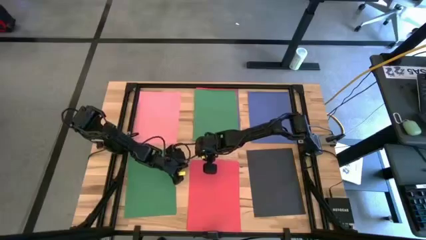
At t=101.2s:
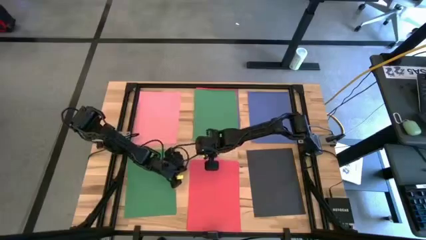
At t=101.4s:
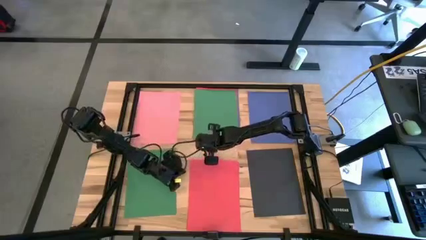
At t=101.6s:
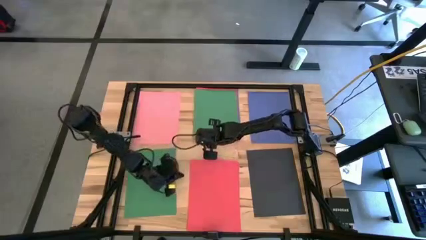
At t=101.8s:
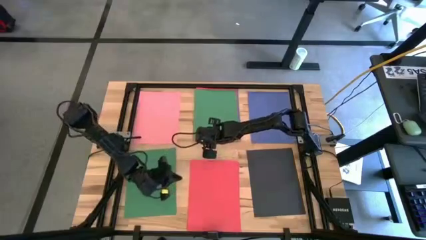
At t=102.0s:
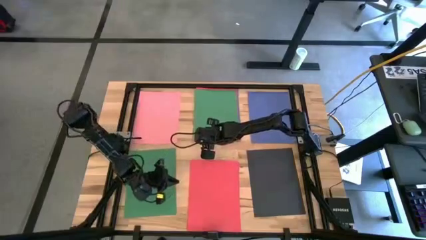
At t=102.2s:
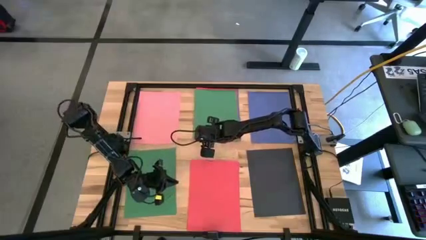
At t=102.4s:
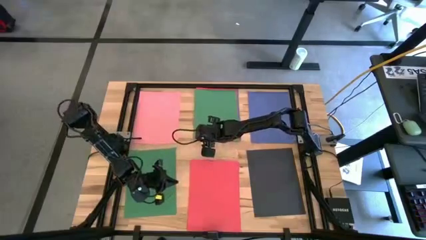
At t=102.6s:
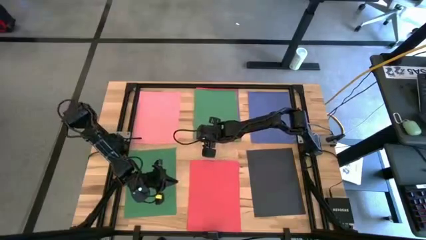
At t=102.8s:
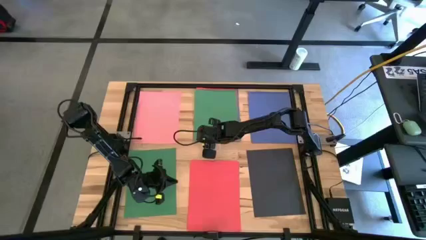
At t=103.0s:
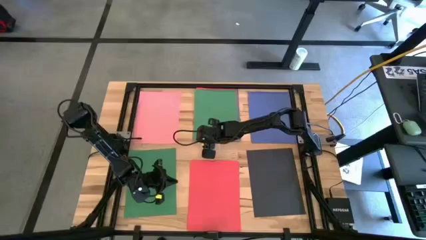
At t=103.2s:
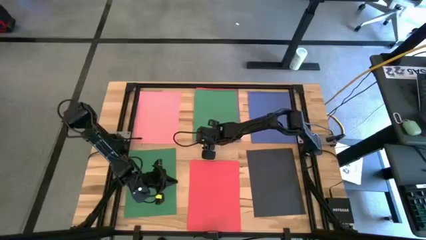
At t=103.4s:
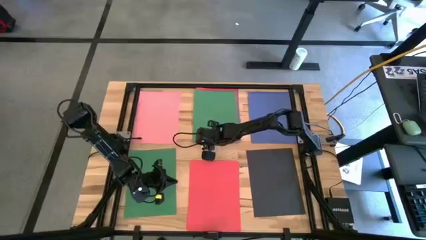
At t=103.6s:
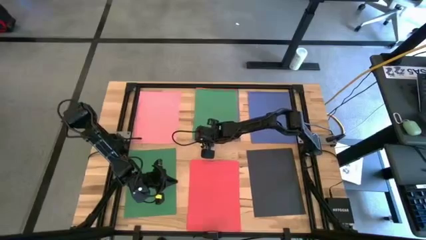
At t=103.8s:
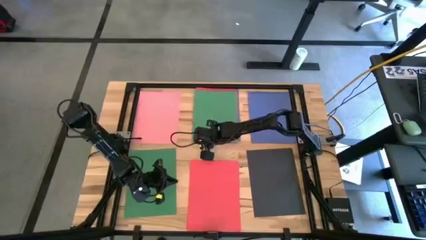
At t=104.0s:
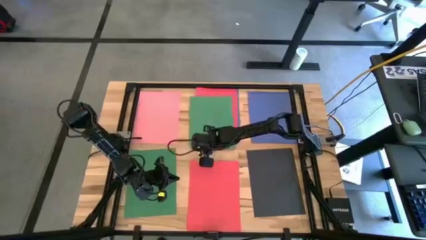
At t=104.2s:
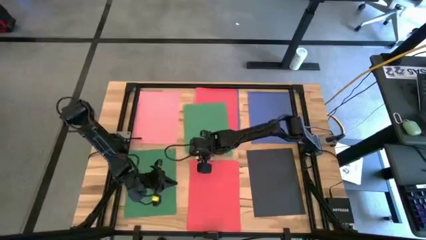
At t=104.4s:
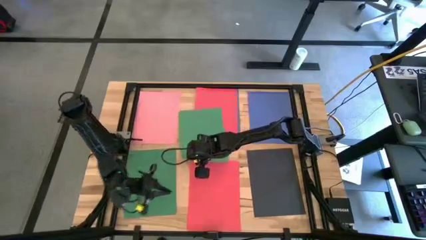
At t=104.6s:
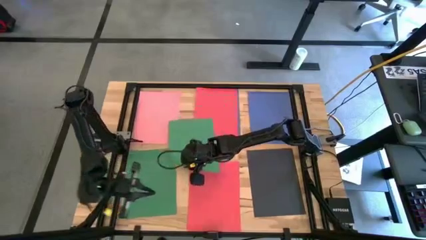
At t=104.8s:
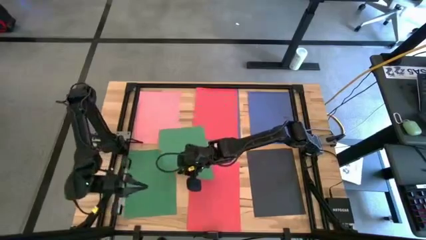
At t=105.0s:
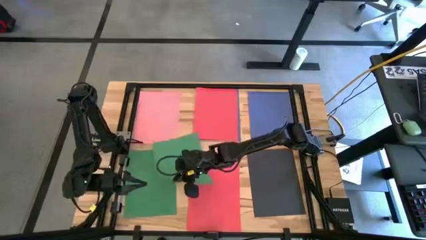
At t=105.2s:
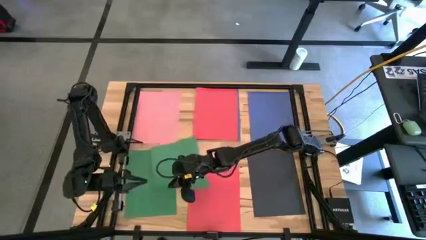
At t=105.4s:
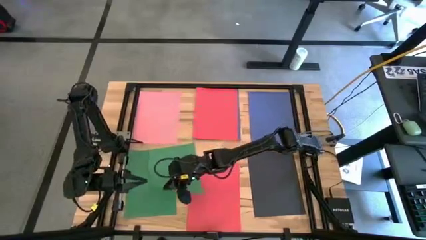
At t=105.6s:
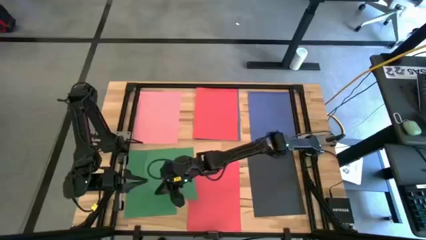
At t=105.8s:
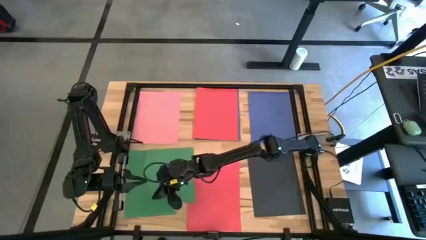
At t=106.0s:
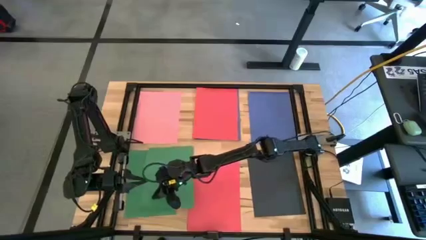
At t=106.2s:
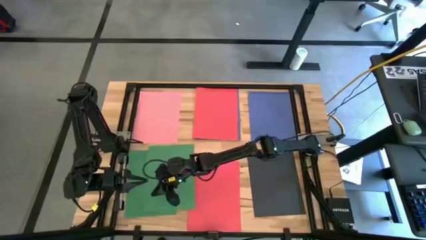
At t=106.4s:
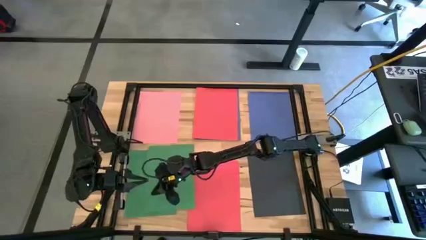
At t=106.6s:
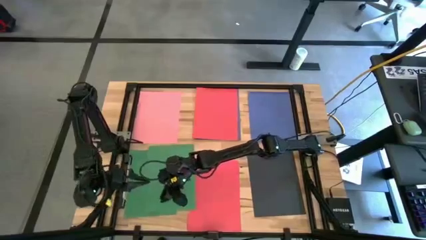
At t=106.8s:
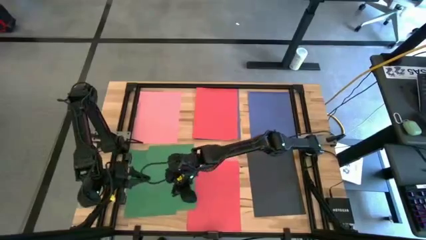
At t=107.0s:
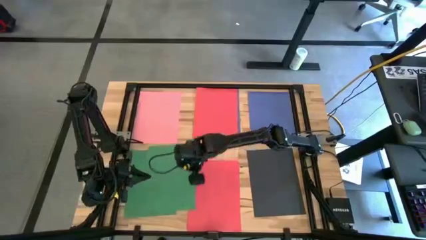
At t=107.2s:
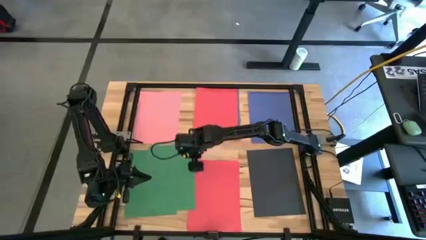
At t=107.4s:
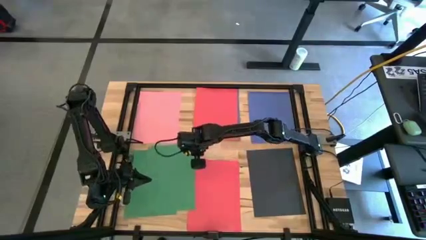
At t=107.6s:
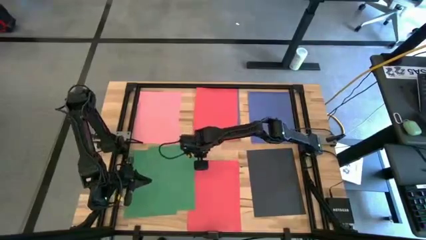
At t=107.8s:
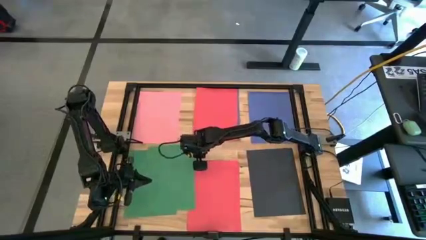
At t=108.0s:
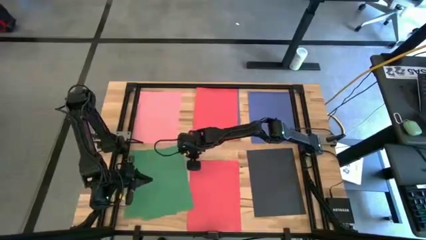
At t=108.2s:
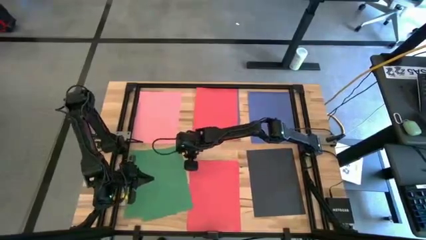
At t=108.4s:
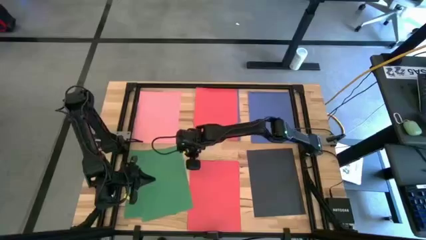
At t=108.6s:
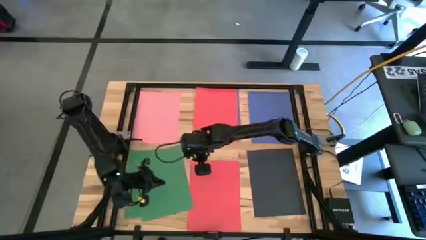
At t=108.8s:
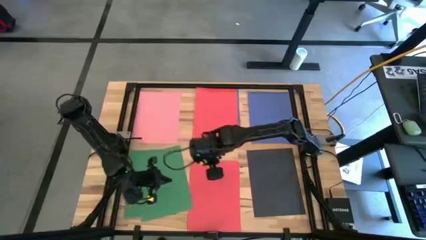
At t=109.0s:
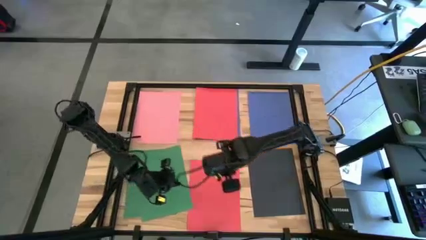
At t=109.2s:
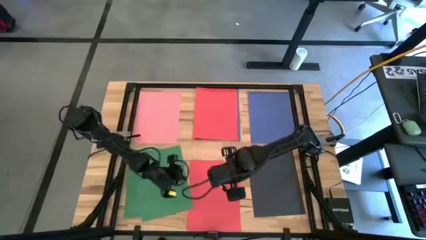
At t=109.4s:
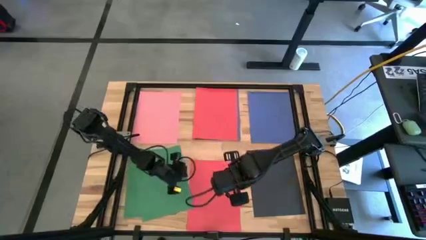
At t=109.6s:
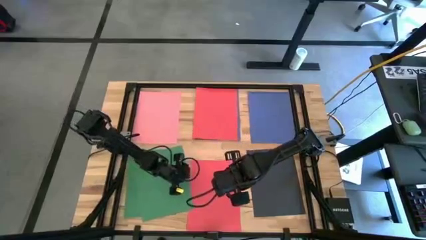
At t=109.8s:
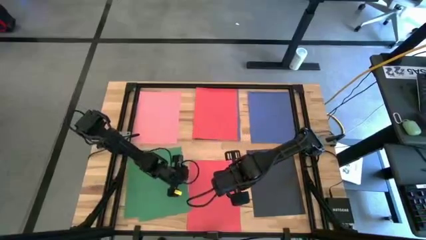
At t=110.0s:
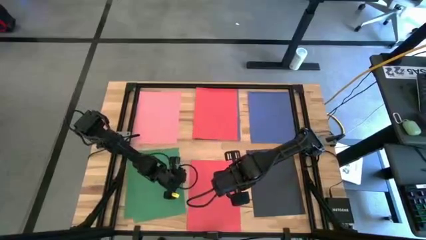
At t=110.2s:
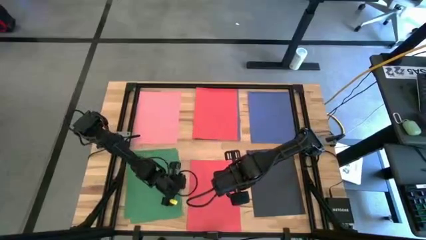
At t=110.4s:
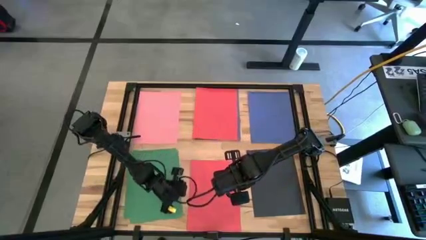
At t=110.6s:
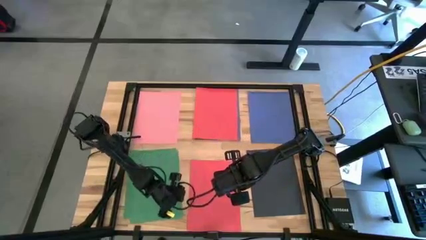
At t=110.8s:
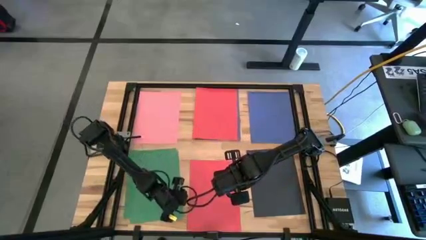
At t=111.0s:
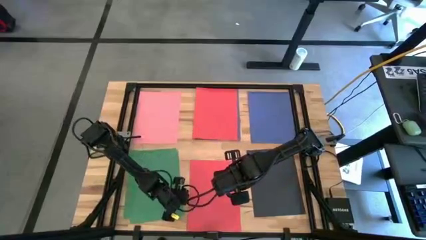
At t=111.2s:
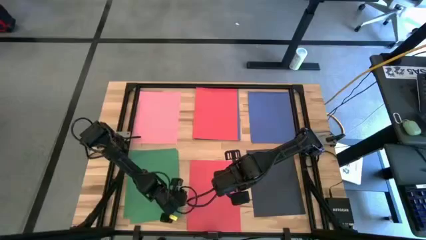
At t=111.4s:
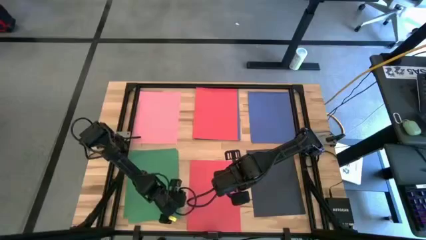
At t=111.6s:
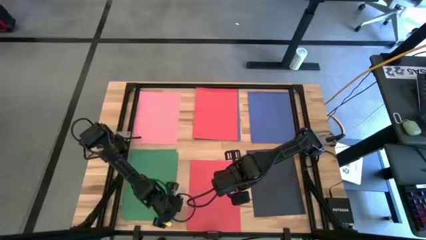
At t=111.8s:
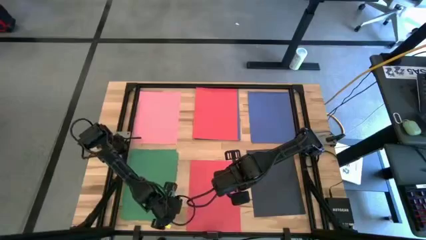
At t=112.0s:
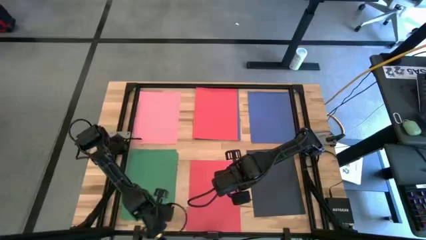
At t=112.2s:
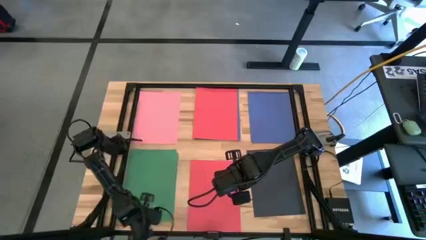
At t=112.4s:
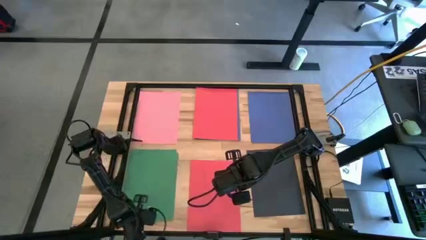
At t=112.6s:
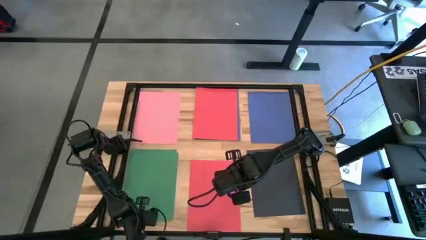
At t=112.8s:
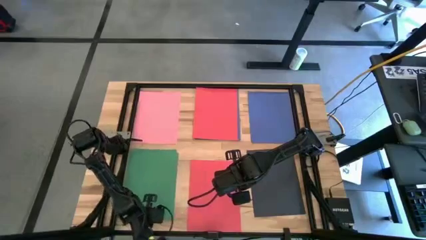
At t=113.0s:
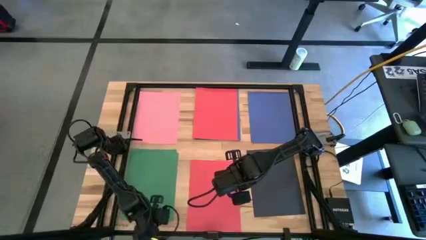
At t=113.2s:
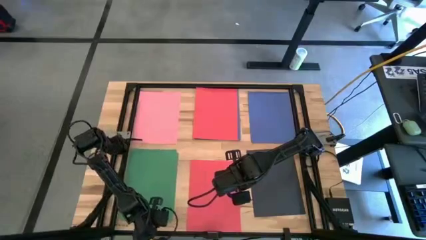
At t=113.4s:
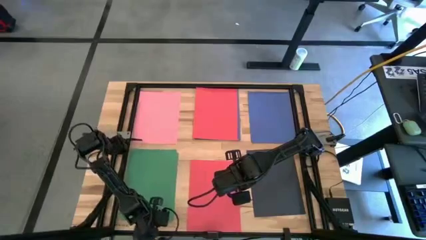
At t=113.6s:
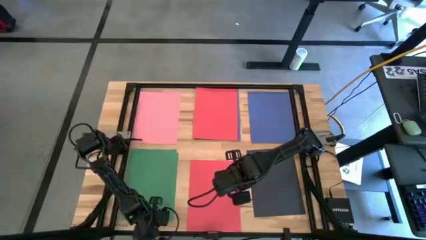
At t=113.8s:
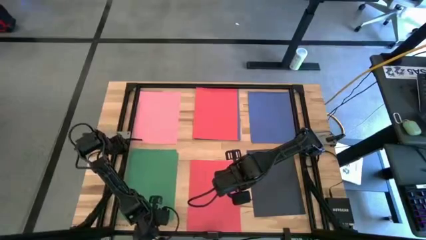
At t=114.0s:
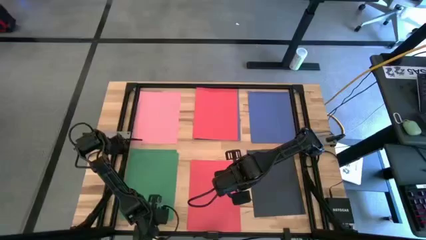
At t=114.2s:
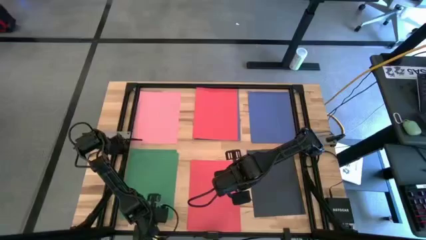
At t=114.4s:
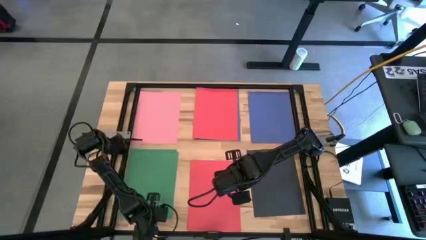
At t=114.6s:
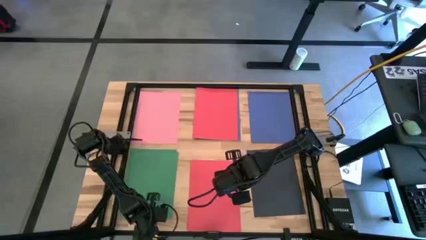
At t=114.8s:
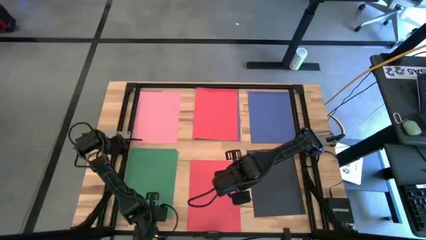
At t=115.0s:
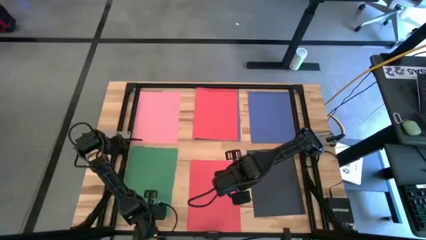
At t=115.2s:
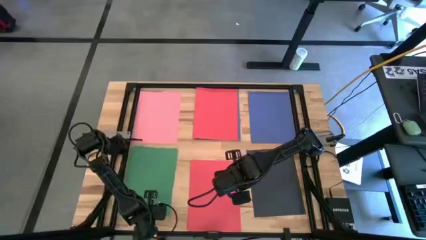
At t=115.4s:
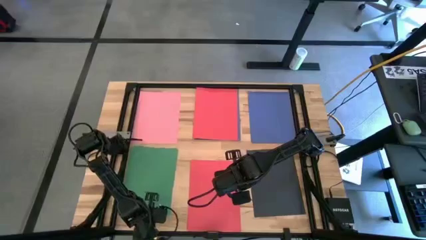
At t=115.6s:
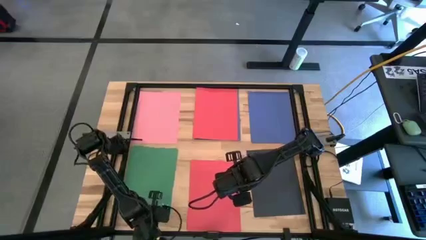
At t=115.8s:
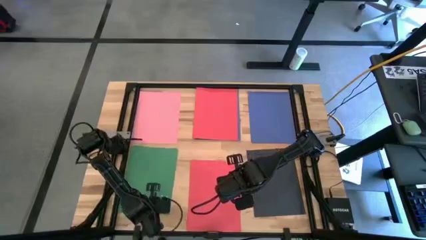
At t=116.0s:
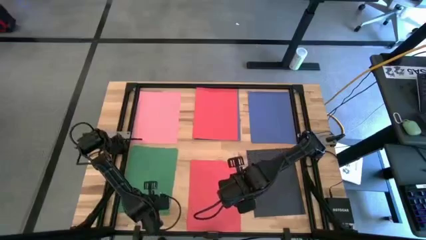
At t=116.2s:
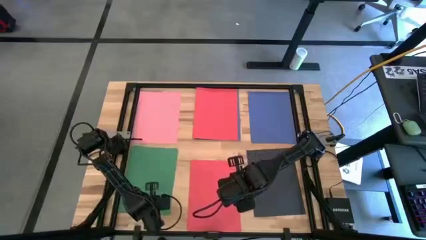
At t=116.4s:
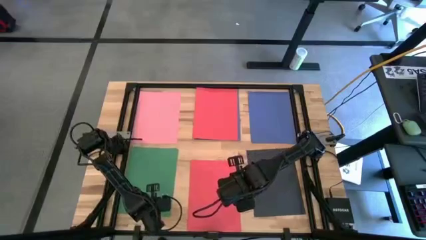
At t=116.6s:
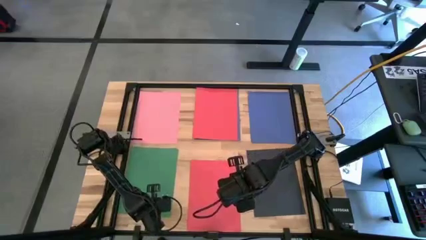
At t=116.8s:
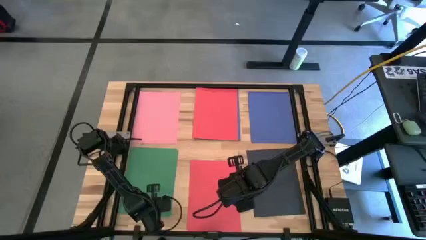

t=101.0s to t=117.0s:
Task: Organize paper
Stack the green paper on top of the green paper

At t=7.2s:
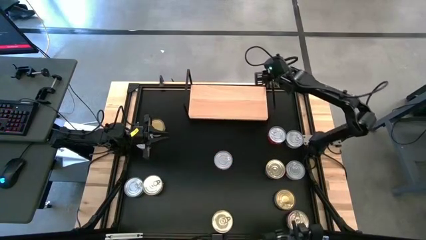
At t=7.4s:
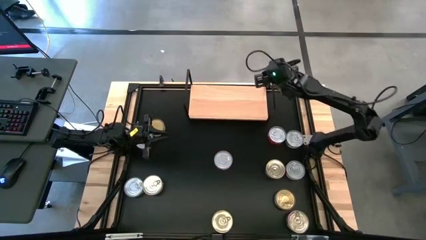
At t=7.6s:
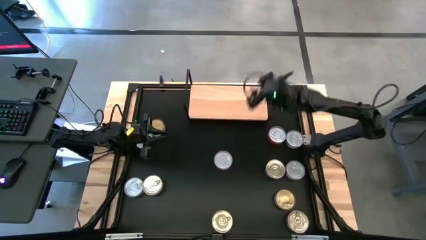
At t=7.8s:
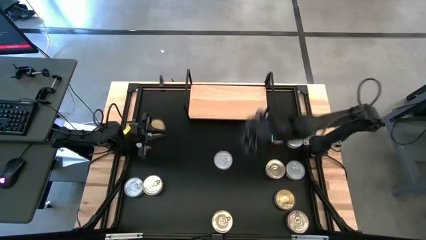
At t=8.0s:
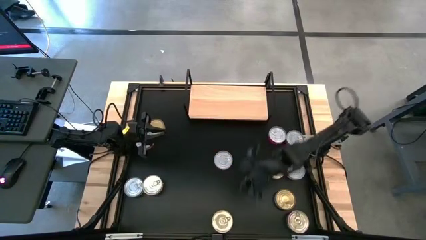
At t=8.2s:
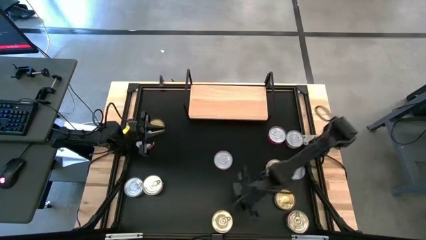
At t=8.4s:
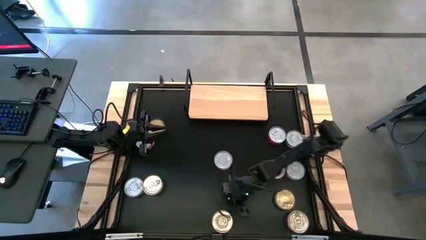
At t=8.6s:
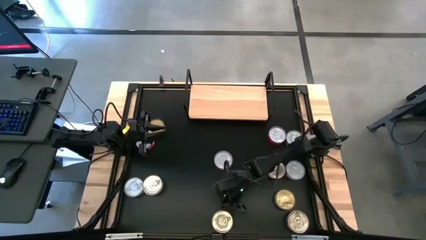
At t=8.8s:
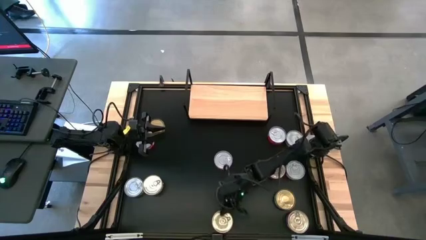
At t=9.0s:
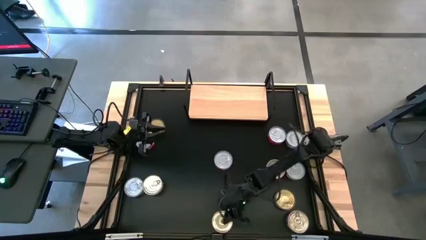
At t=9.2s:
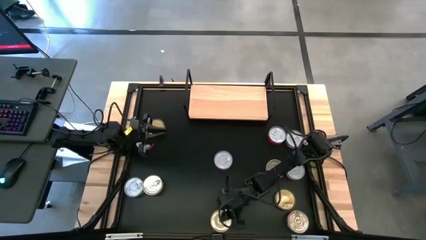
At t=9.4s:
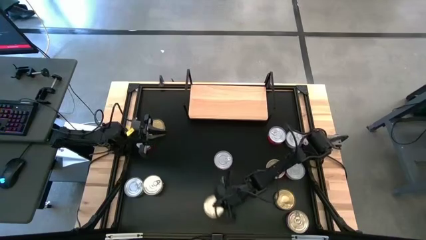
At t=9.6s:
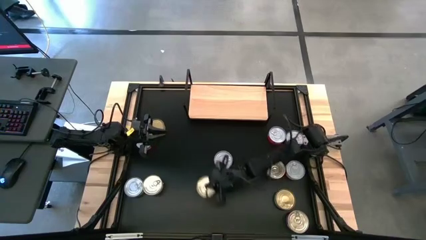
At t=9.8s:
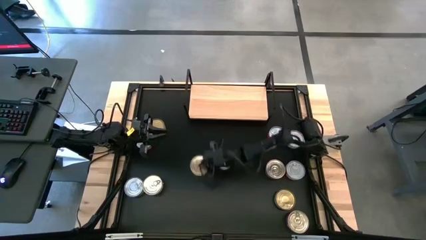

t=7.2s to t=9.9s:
Task: Stack canned seafood by type on shelf
Move the blue tuna can to the center
